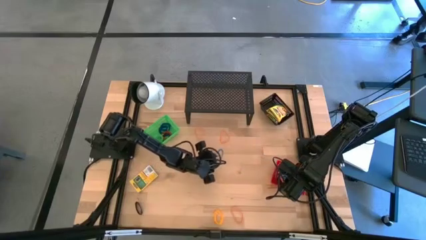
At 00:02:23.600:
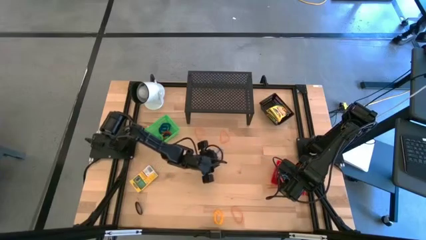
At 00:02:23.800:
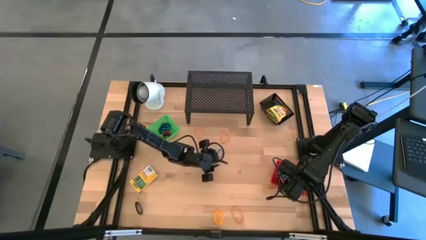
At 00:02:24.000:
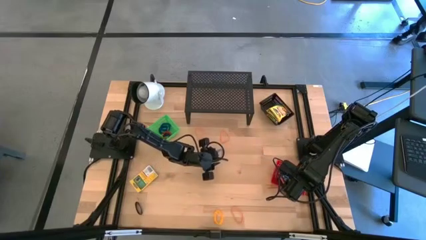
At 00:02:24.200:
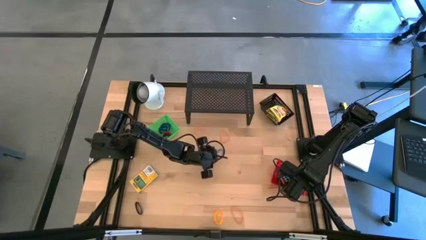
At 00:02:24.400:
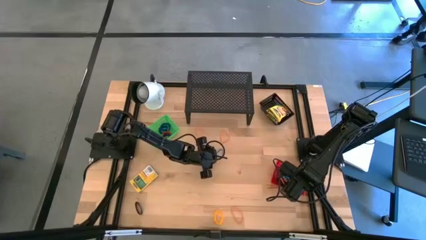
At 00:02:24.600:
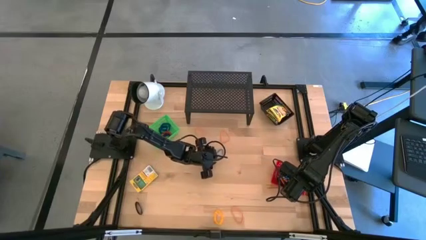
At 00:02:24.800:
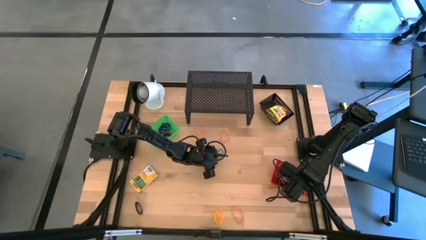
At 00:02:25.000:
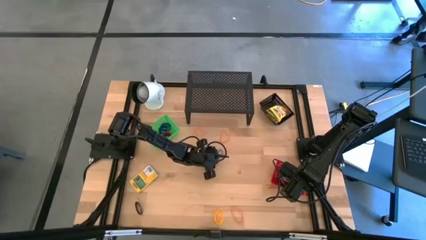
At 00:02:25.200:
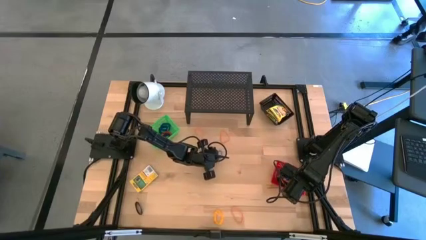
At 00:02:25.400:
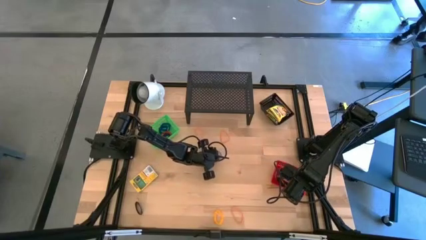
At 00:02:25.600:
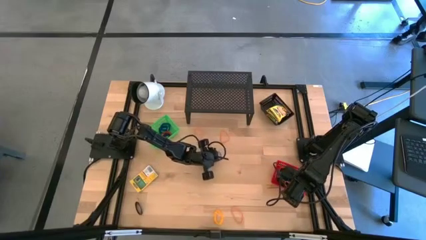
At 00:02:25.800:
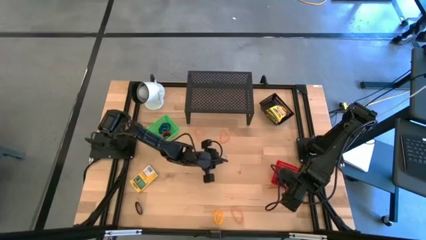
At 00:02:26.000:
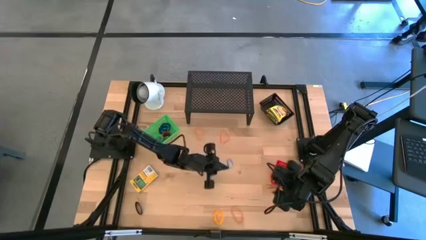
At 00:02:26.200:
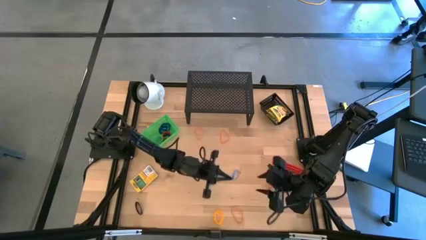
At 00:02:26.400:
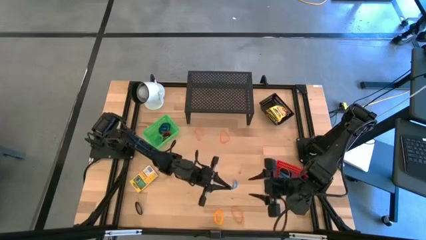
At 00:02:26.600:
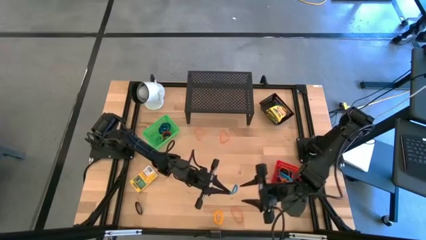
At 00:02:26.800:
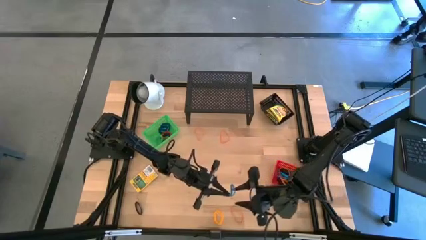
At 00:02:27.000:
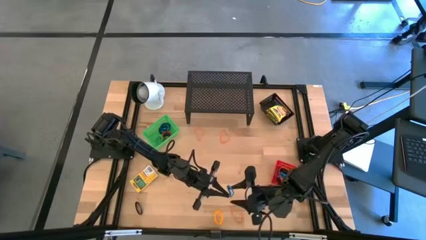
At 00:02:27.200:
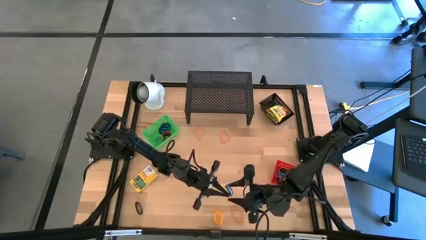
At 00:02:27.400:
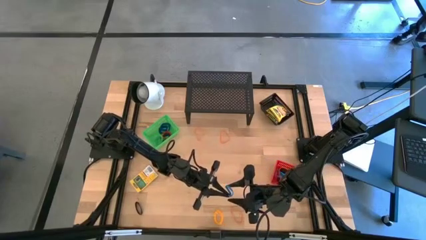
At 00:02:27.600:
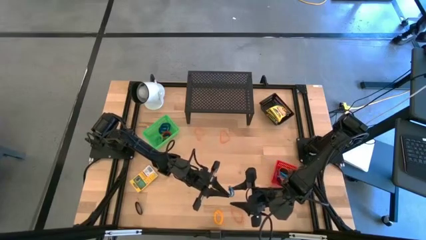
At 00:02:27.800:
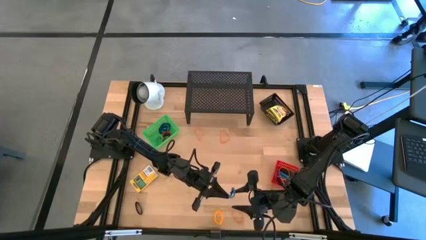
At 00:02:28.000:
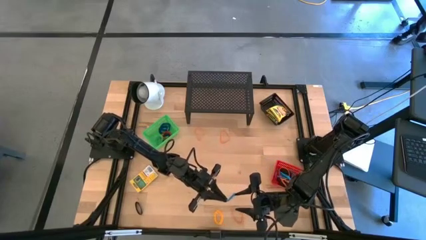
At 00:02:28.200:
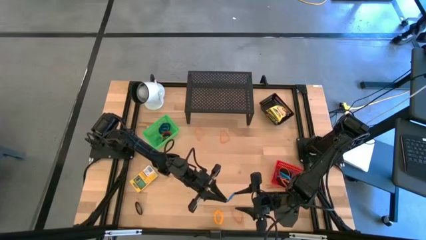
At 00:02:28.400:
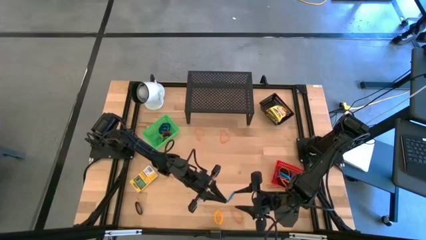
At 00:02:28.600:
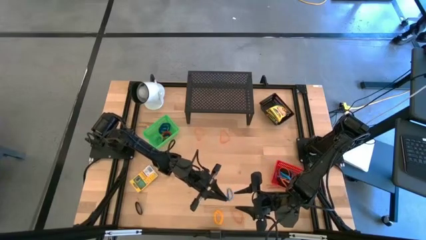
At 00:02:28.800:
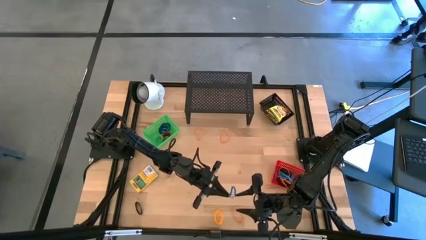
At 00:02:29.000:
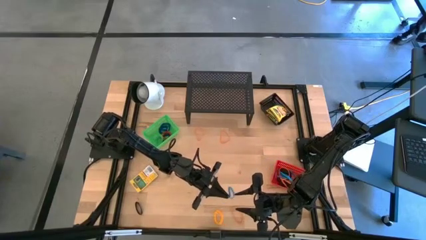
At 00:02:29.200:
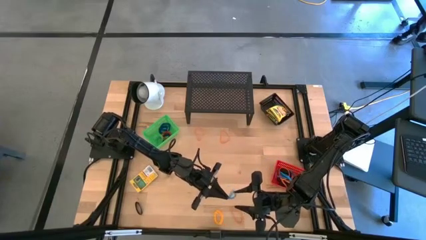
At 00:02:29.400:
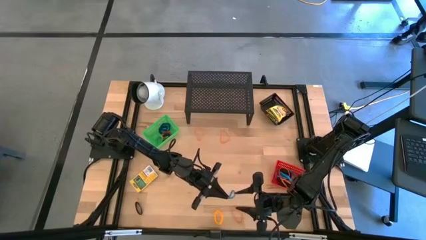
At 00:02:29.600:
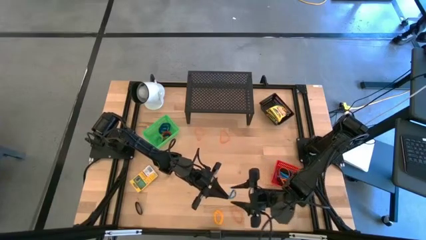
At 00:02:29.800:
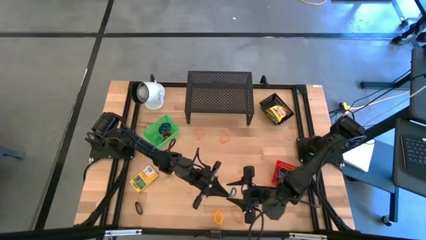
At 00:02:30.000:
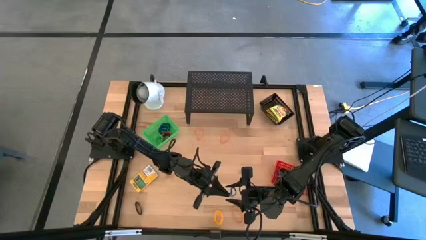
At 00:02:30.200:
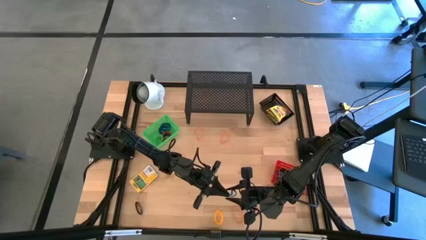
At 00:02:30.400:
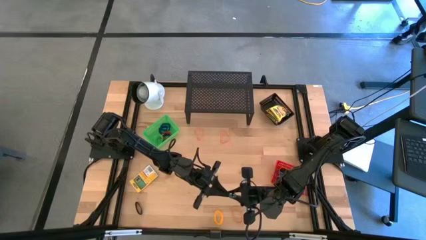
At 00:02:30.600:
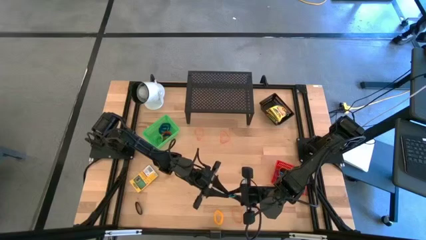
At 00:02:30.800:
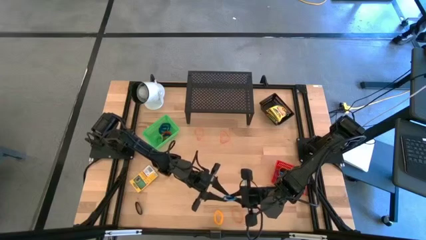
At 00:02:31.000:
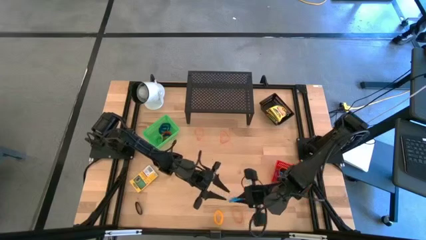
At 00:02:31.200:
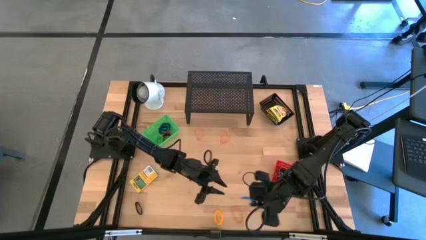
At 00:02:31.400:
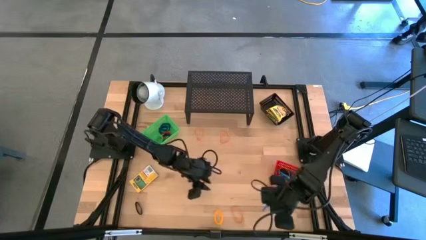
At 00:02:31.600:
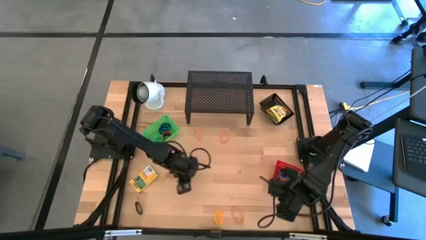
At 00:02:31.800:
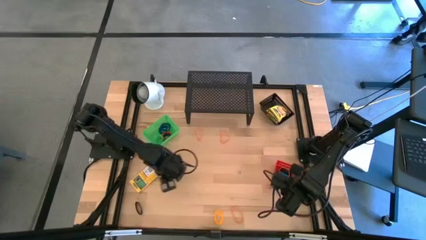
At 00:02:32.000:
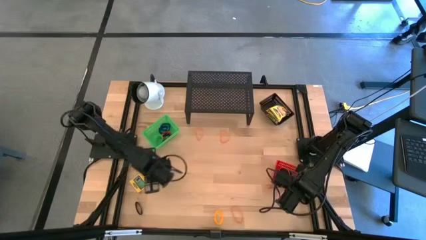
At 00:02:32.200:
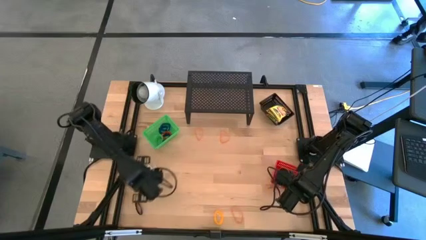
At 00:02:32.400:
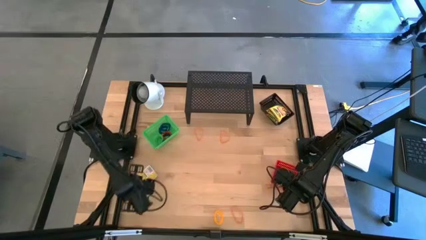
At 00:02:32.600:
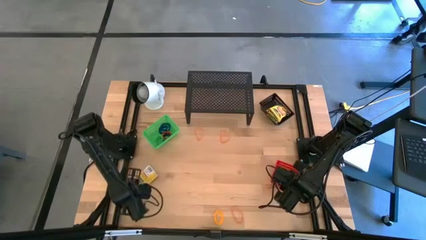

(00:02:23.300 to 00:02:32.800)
Task: Pick & Place Office Desk Supplies
Put the blue rubber band into the red bin

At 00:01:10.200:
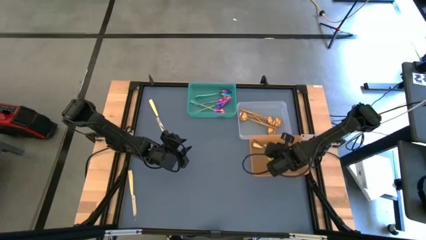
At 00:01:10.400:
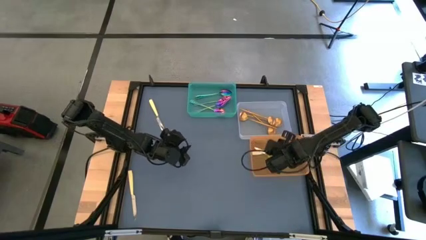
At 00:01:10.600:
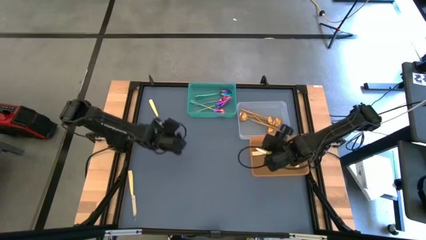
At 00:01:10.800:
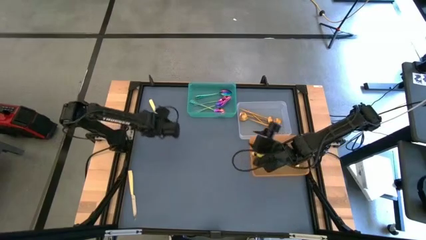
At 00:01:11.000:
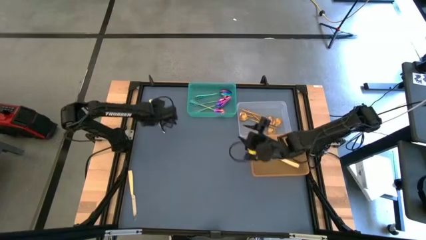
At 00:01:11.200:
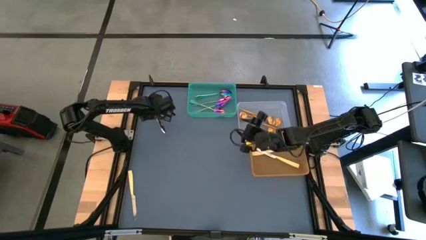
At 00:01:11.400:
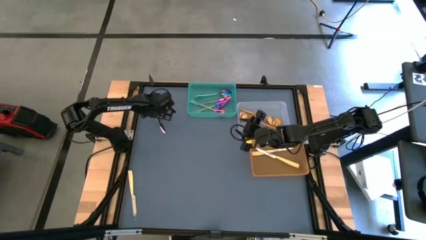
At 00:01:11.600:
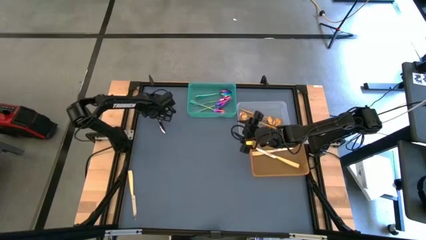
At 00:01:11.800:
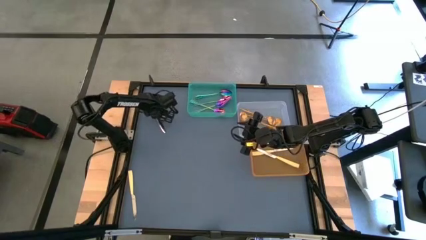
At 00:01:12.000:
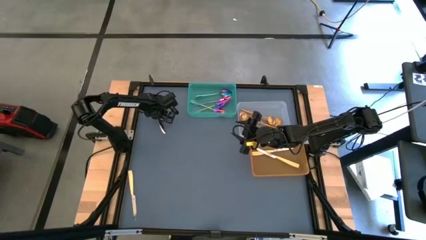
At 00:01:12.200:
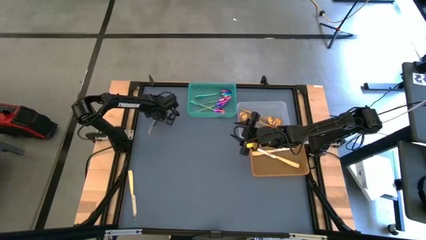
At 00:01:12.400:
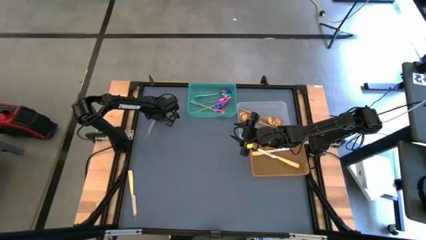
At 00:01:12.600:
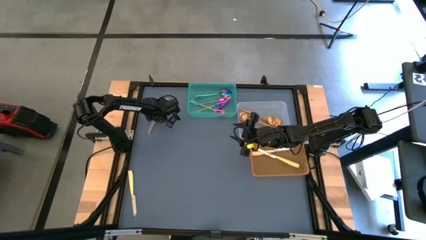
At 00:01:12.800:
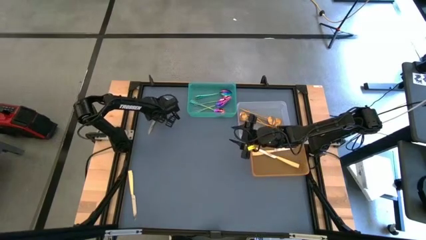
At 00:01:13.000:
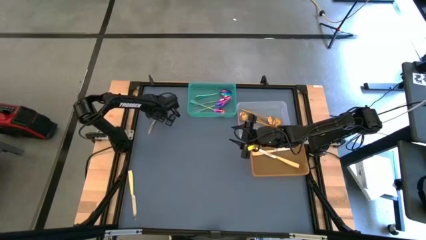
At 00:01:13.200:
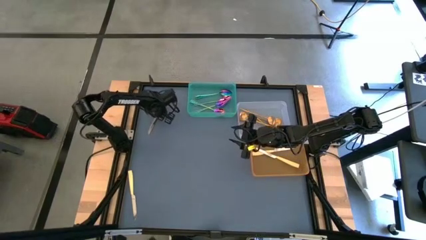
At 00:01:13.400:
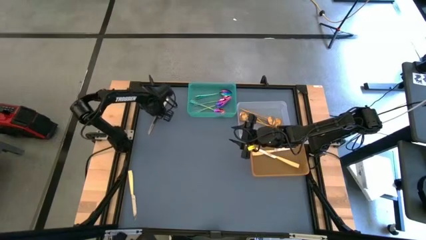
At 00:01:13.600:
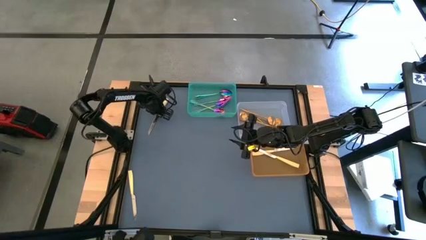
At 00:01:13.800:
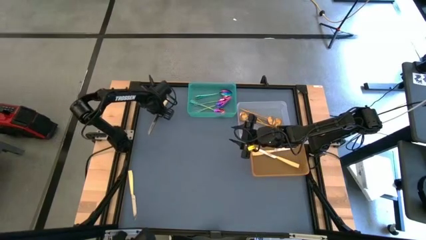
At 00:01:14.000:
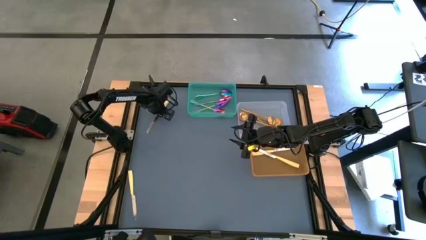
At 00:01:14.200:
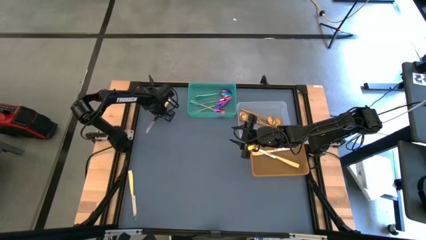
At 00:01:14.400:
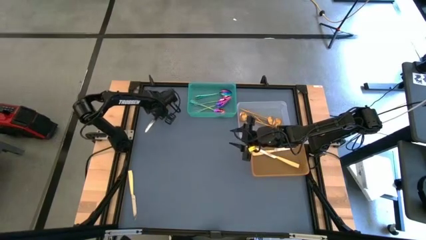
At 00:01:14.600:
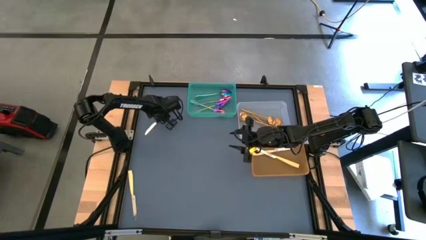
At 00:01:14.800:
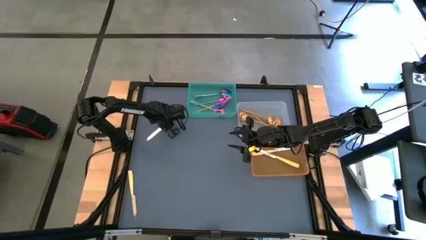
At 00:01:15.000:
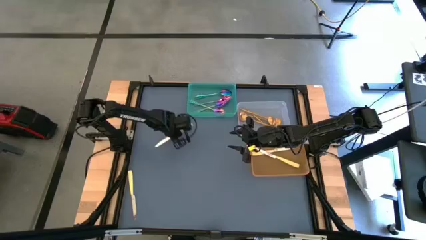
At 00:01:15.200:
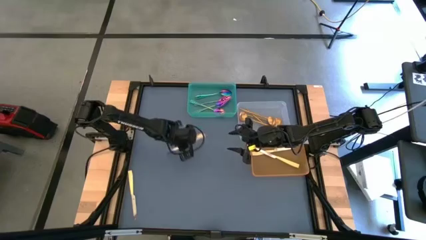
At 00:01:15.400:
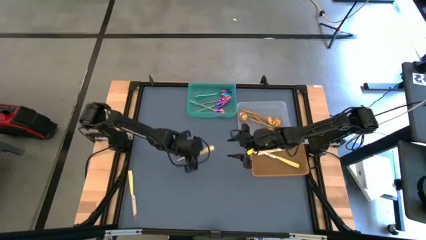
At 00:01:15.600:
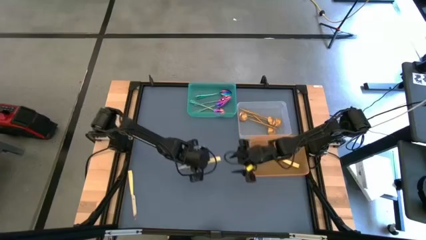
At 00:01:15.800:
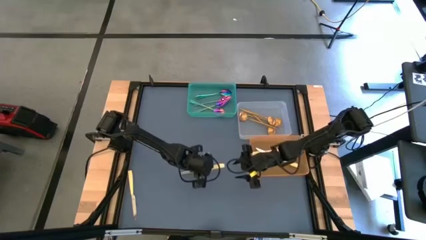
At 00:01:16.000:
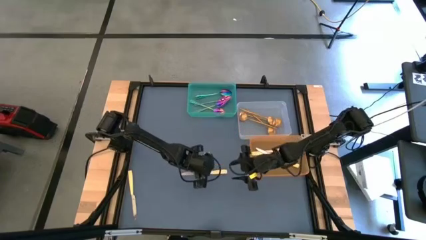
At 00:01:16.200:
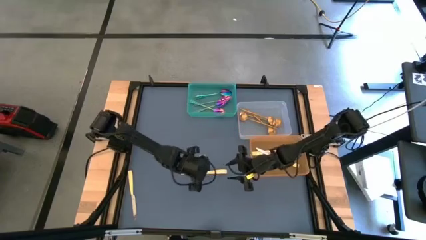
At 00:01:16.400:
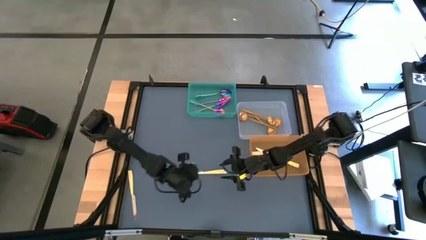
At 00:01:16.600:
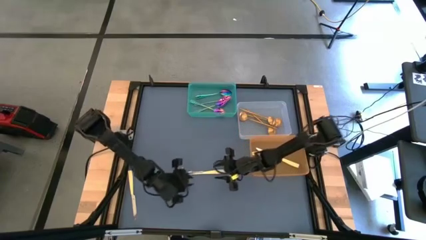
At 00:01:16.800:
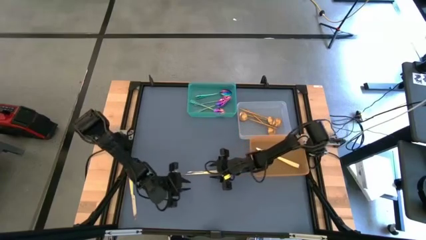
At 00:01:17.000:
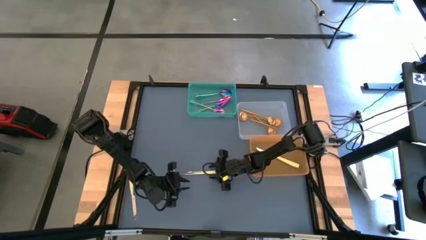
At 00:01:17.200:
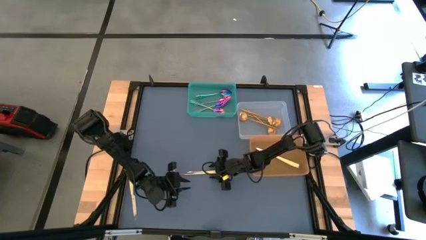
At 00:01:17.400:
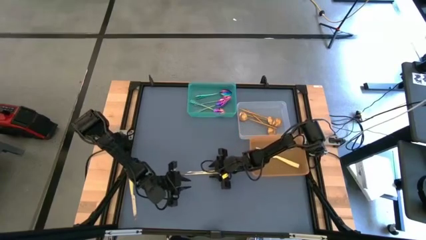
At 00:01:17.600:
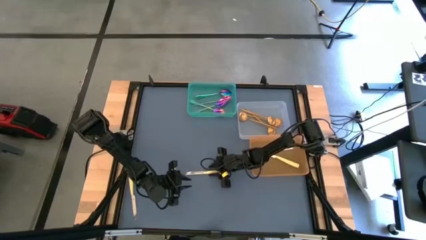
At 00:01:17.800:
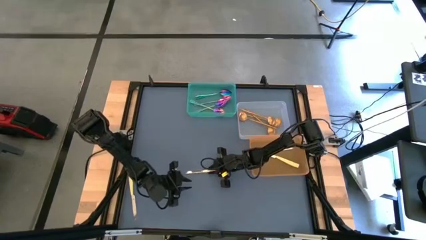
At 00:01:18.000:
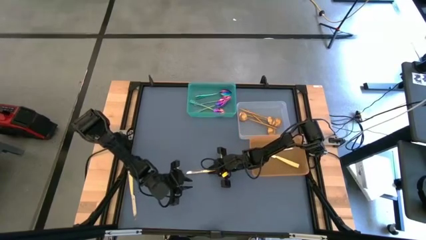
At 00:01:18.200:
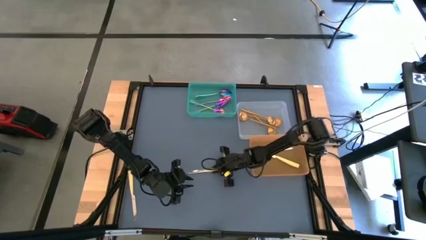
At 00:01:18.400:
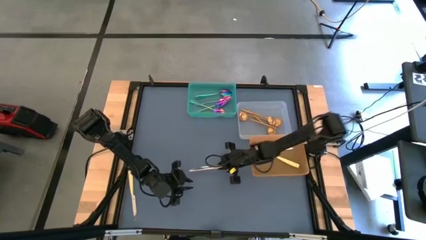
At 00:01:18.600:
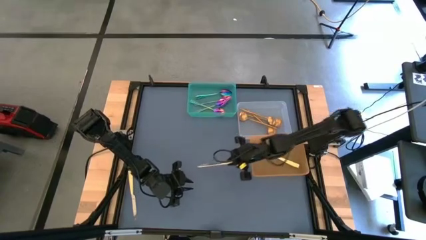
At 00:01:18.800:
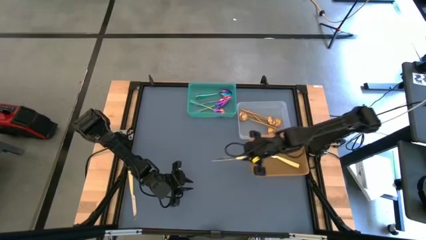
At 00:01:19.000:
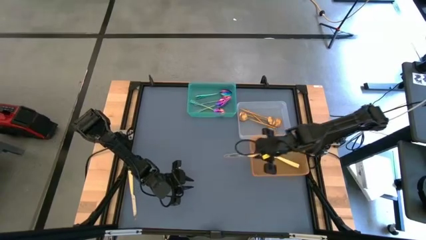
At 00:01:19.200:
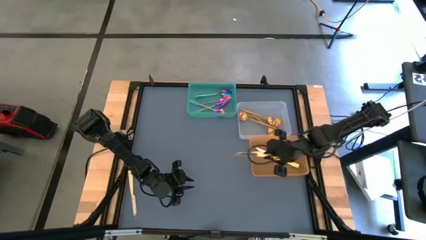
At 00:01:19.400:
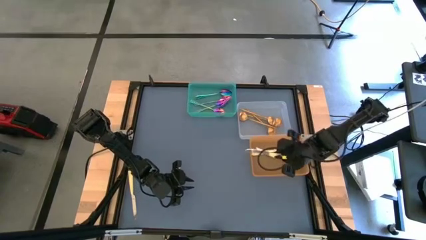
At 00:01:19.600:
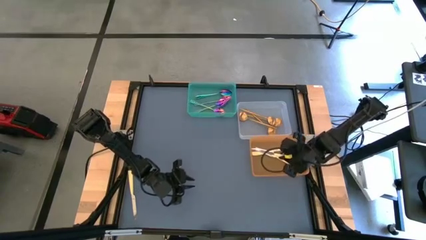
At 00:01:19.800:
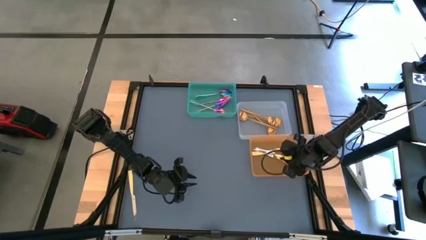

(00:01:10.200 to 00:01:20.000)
Task: Sort silverware by color (type)
Put the table knife into the orange bin
